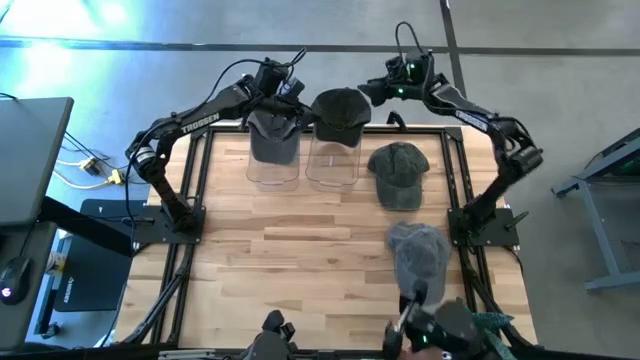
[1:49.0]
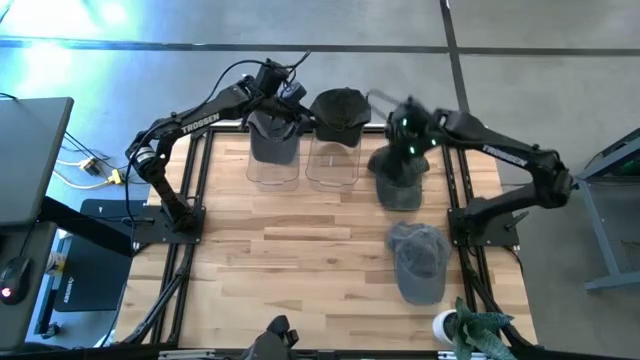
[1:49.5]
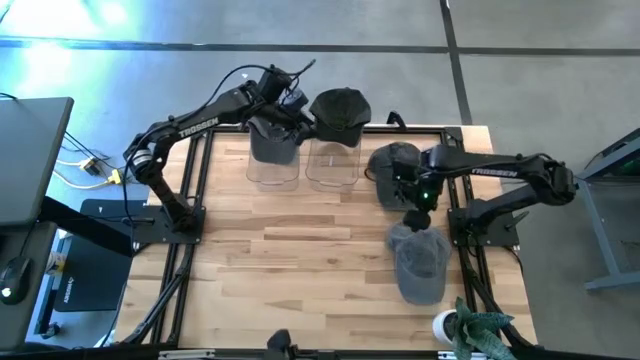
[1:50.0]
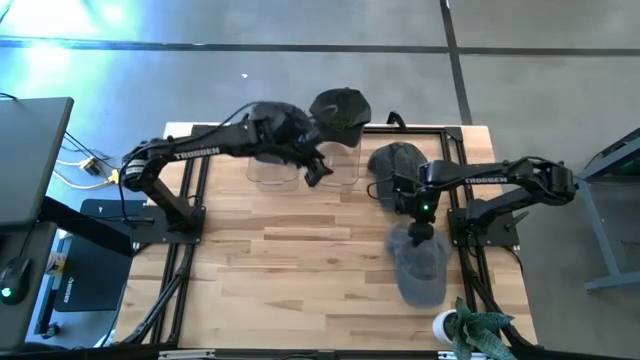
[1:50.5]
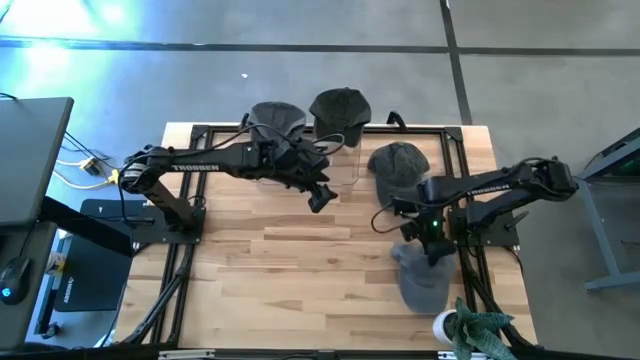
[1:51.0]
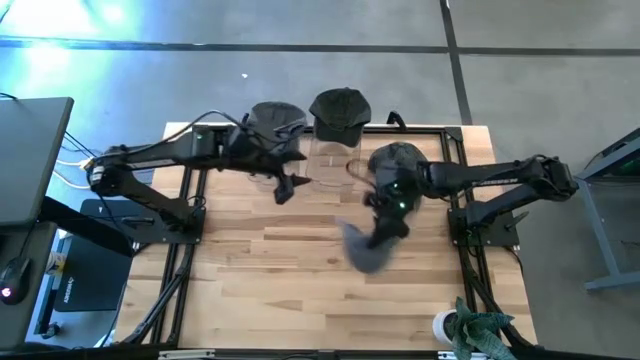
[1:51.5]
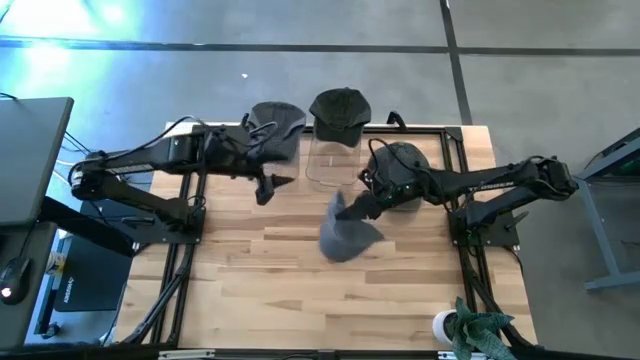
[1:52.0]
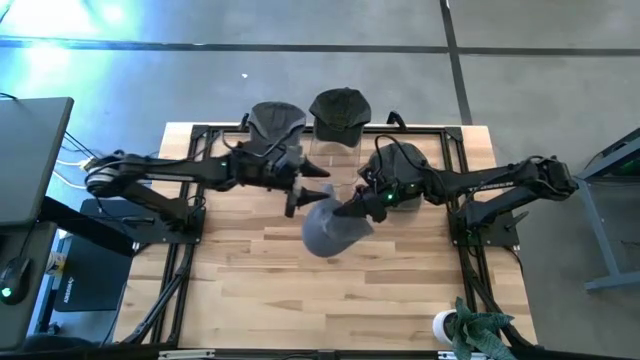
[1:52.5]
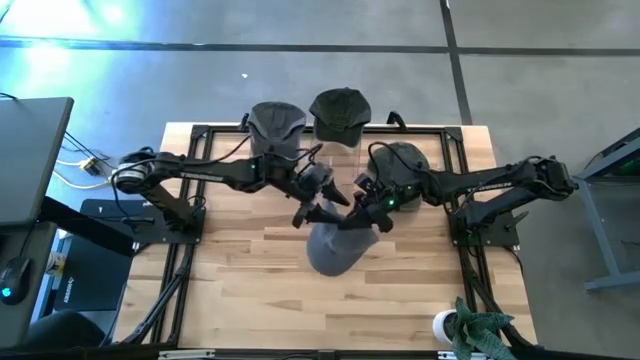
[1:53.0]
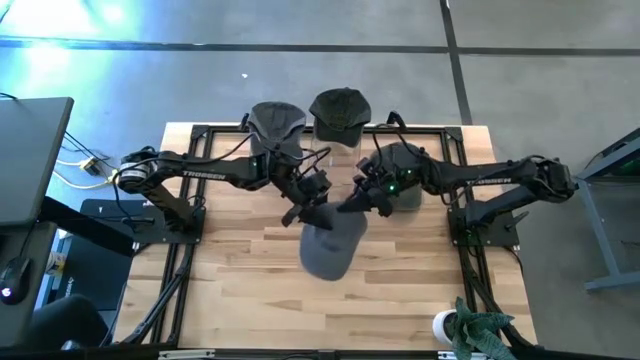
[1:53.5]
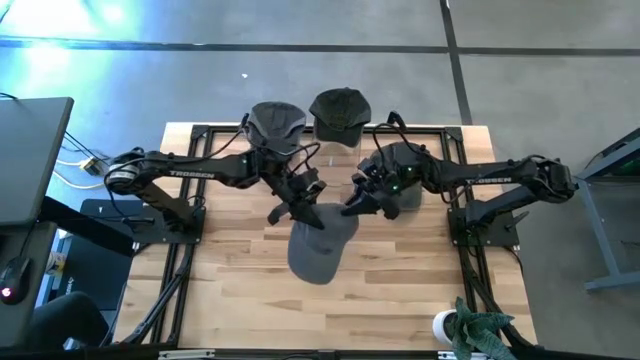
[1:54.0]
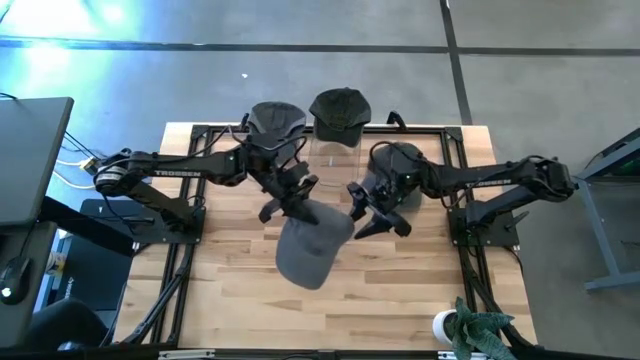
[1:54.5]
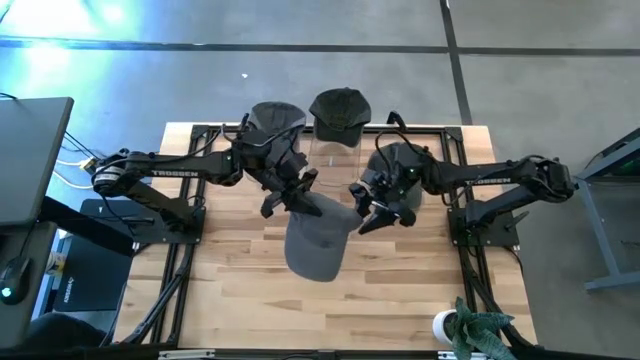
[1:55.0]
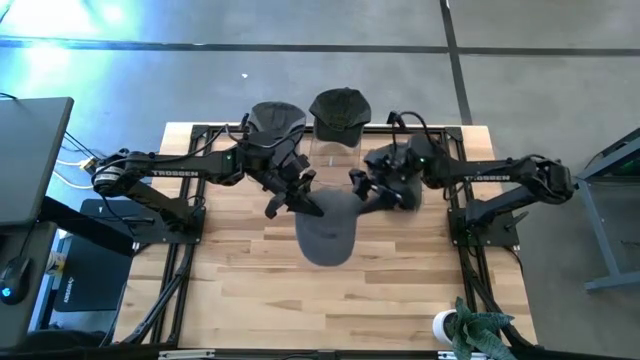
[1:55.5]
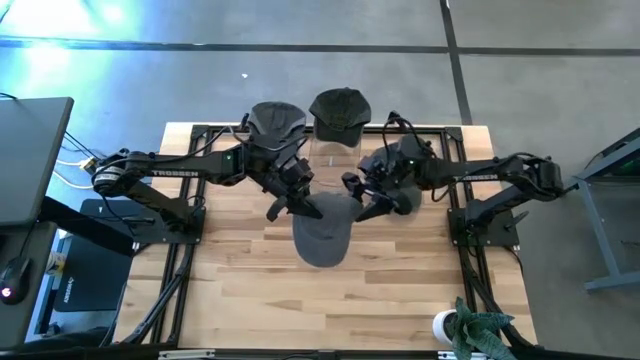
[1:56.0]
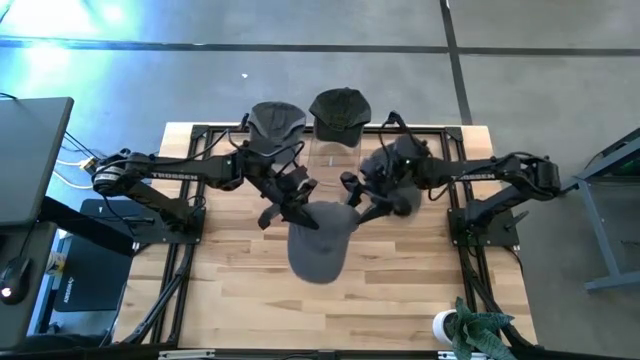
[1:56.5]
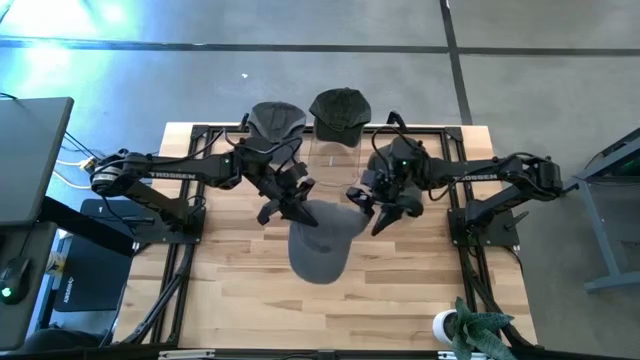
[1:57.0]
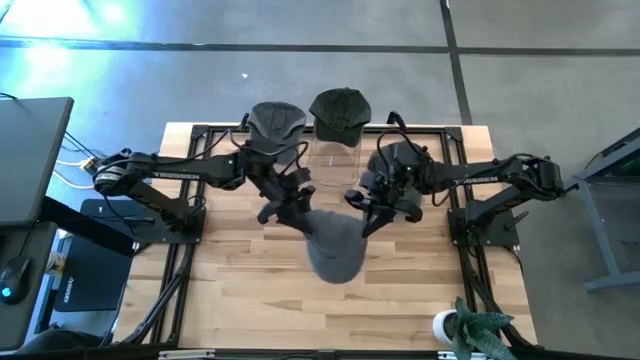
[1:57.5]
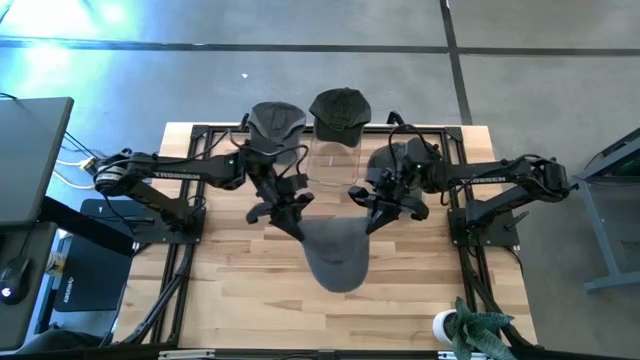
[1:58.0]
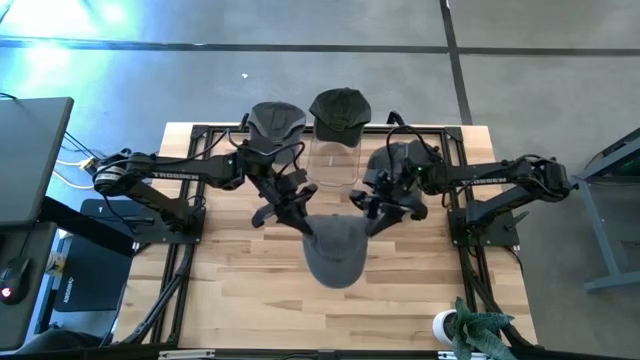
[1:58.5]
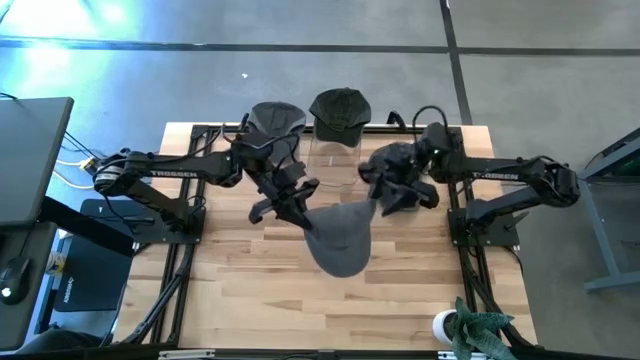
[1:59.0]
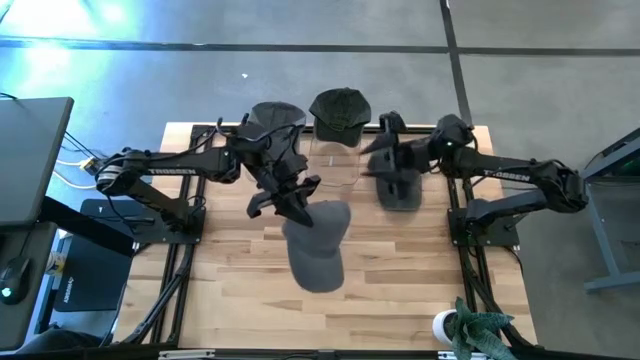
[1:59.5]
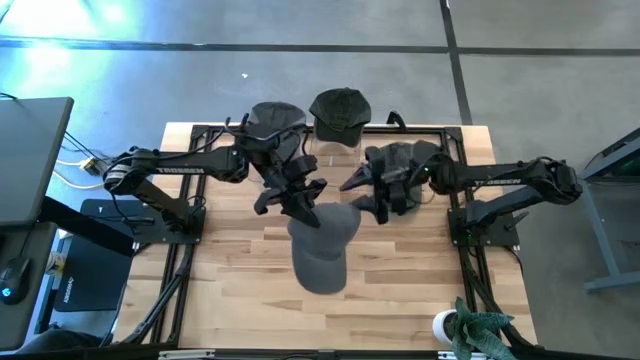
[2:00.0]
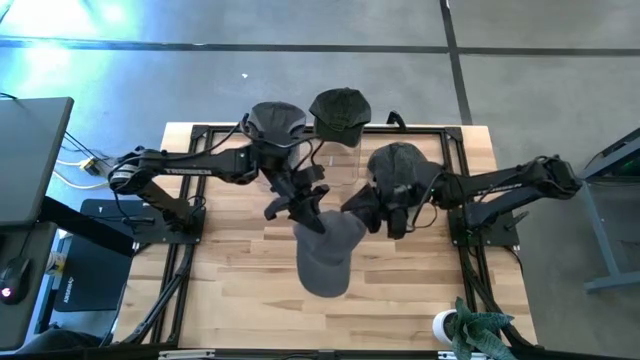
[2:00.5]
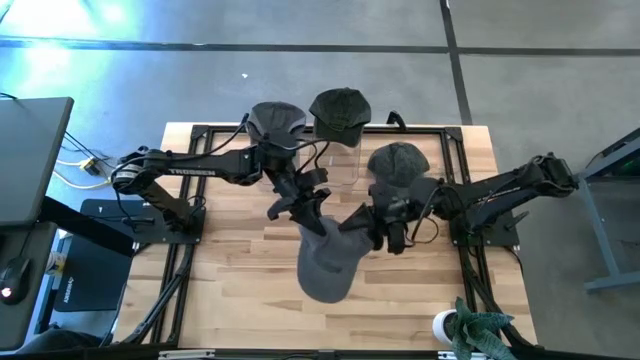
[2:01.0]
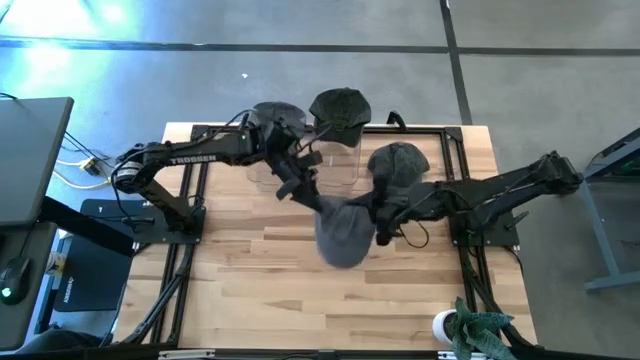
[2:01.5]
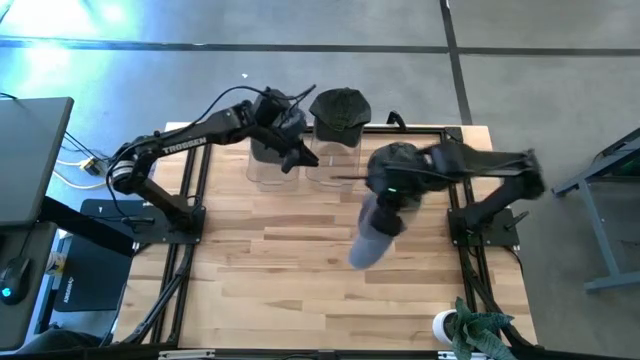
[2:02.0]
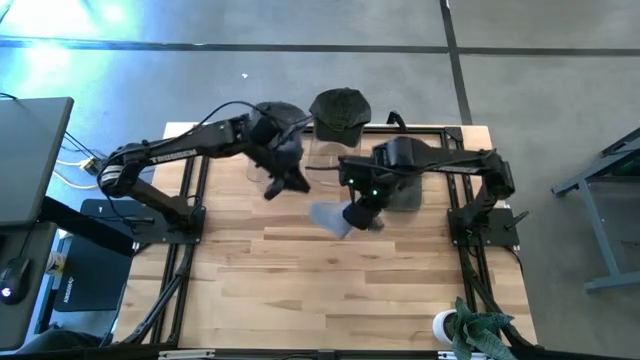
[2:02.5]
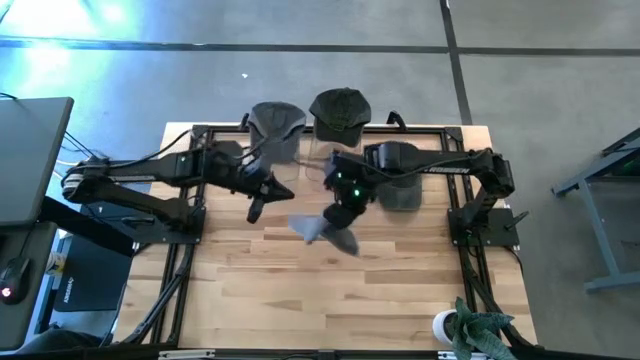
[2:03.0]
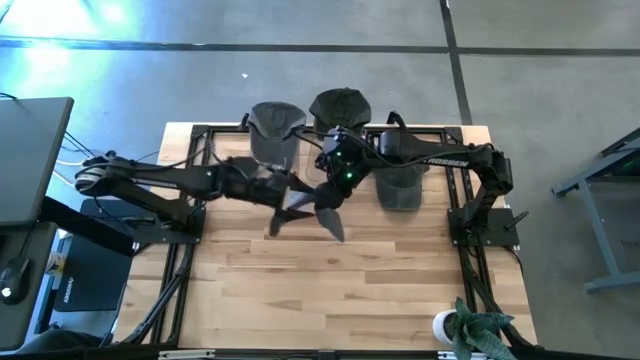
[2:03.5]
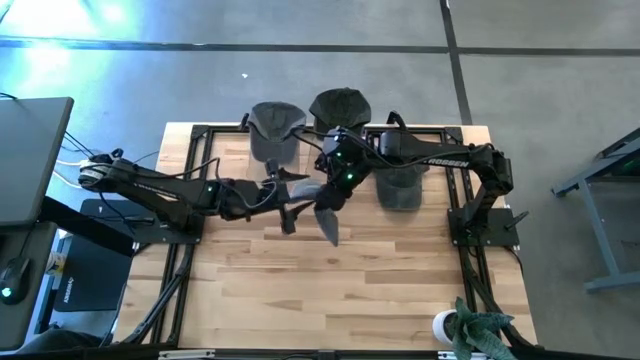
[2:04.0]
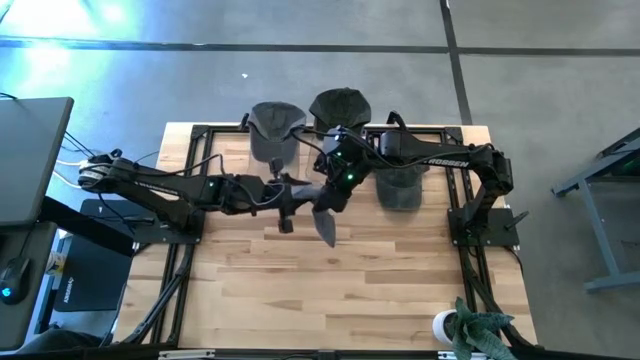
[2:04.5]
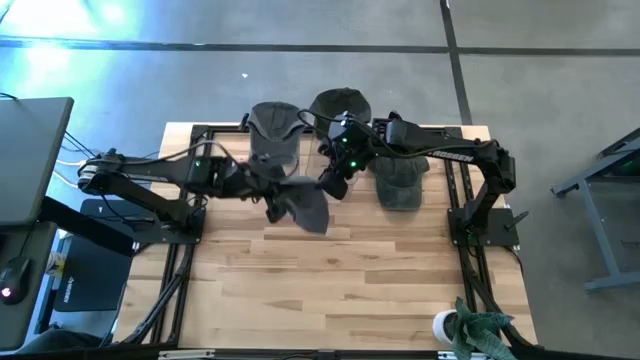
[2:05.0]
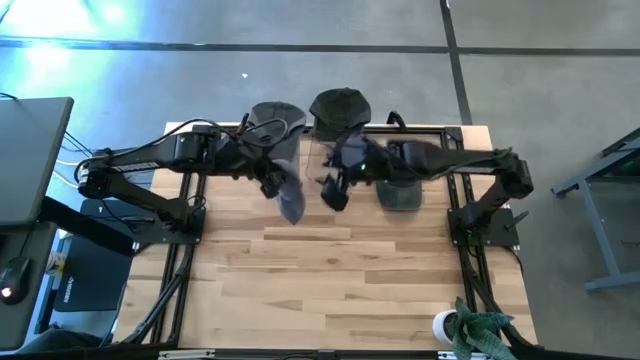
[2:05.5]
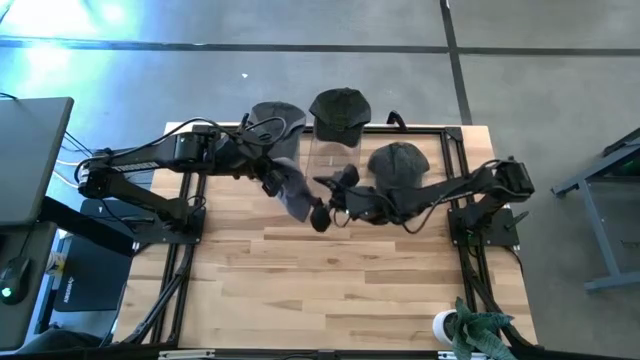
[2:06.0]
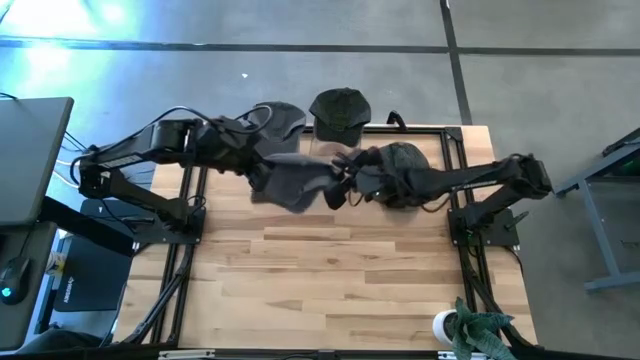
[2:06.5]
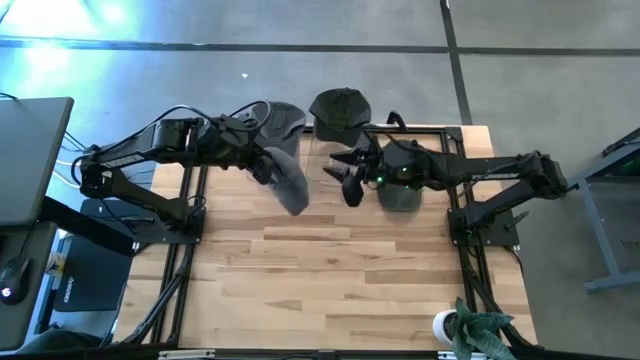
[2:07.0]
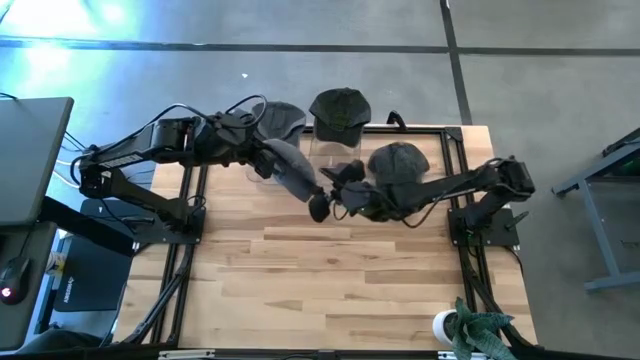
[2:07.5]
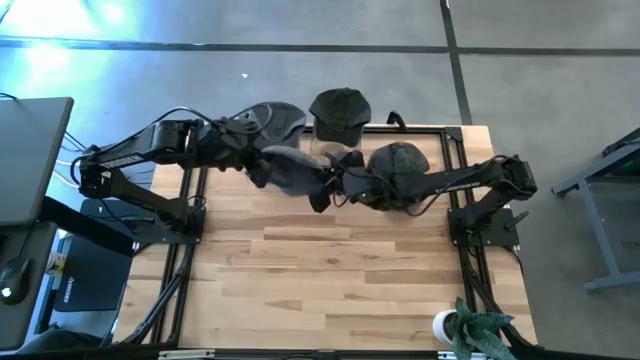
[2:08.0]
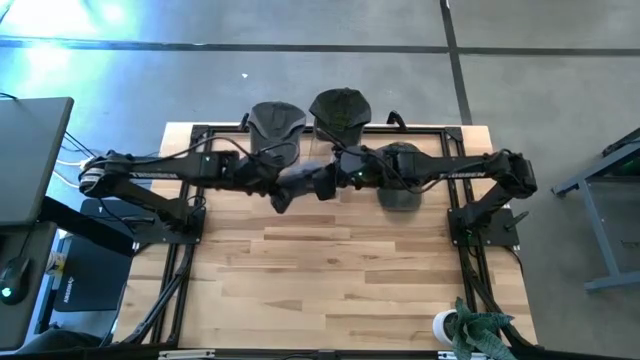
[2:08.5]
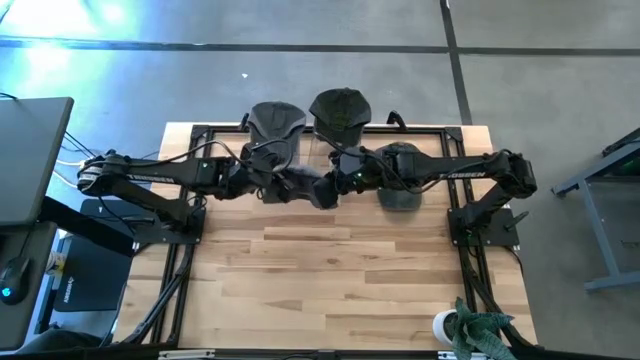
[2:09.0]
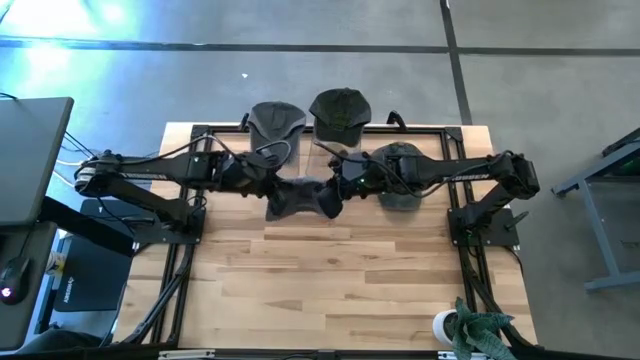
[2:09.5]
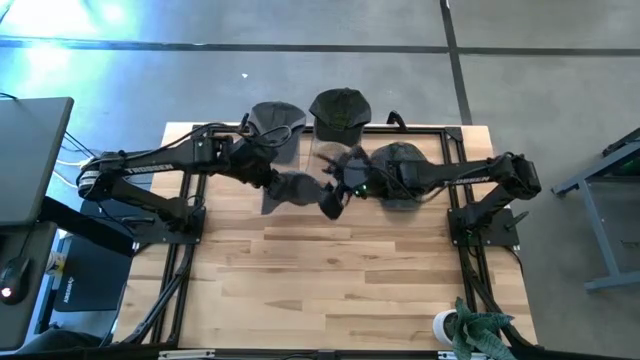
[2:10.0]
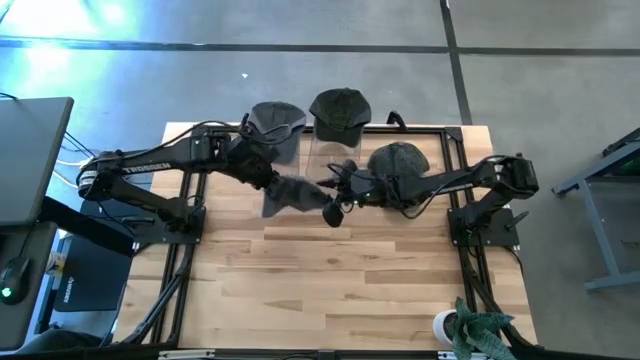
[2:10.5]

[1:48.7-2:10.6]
Task: Pick & Place hat
Put the gray cap into the left transparent bin
